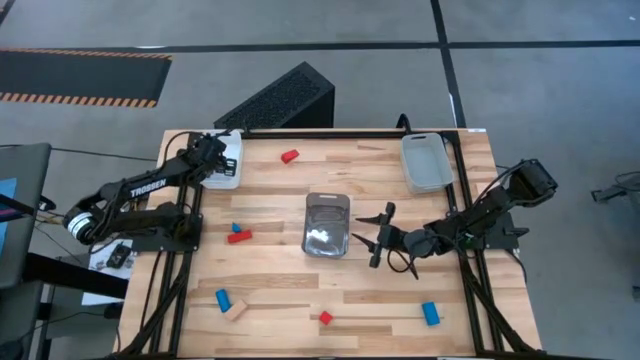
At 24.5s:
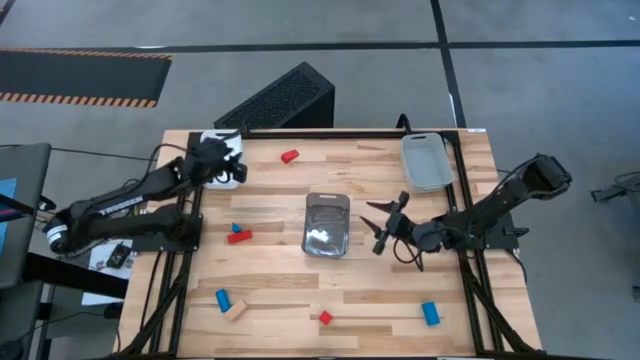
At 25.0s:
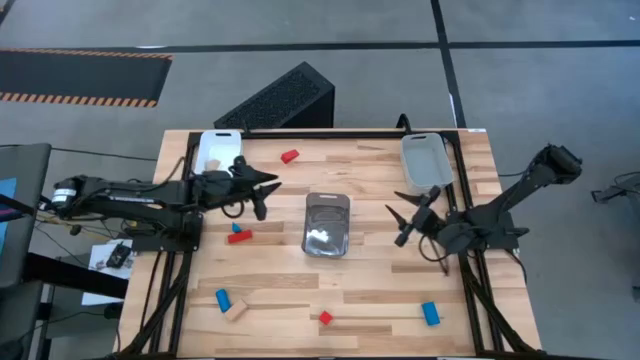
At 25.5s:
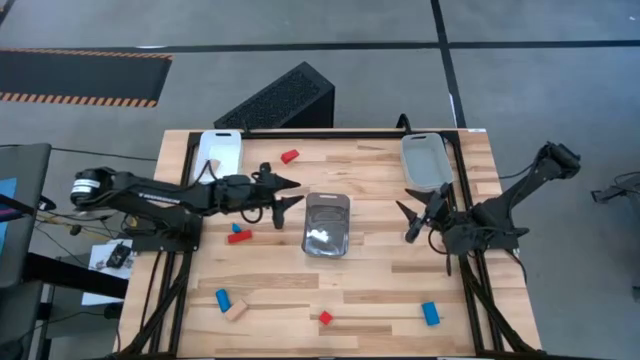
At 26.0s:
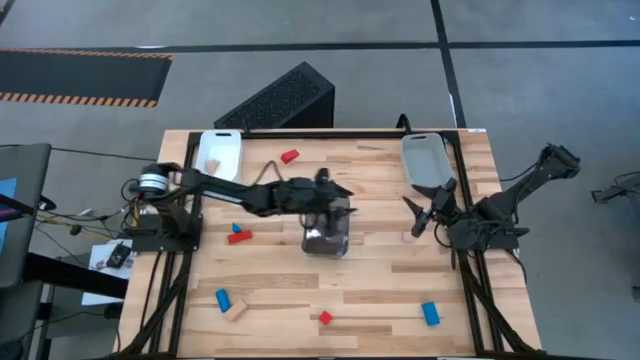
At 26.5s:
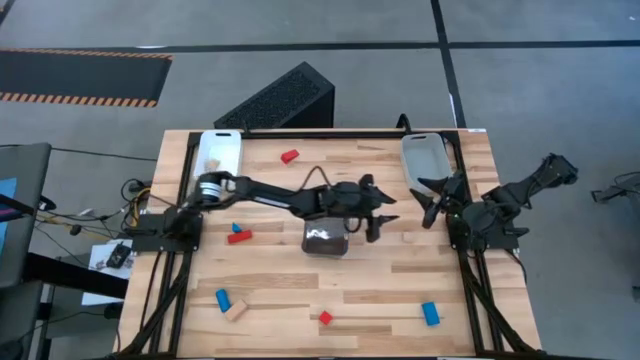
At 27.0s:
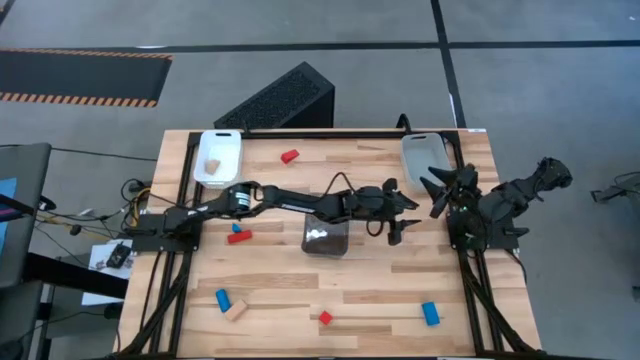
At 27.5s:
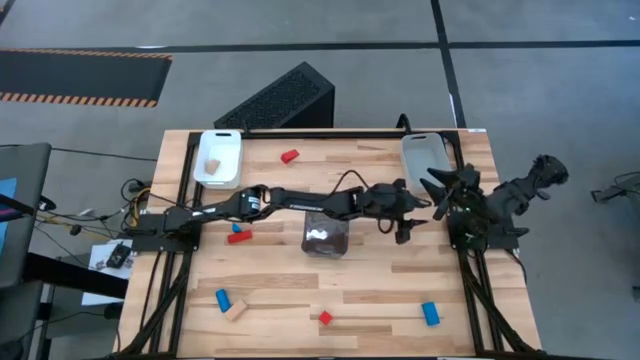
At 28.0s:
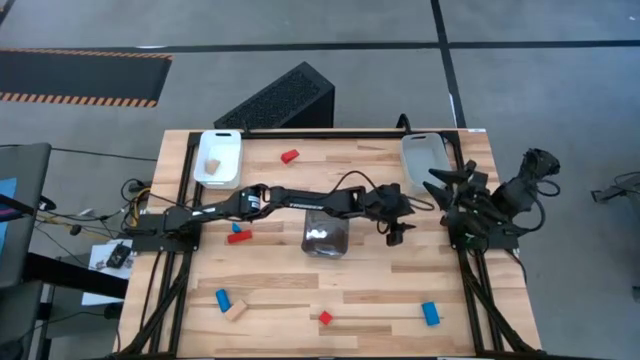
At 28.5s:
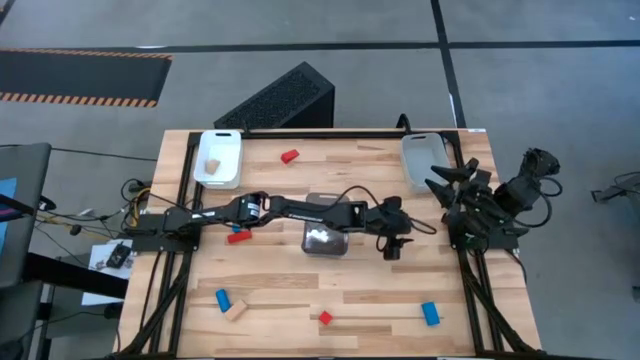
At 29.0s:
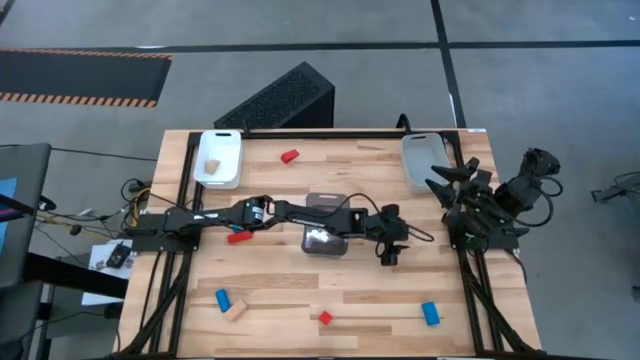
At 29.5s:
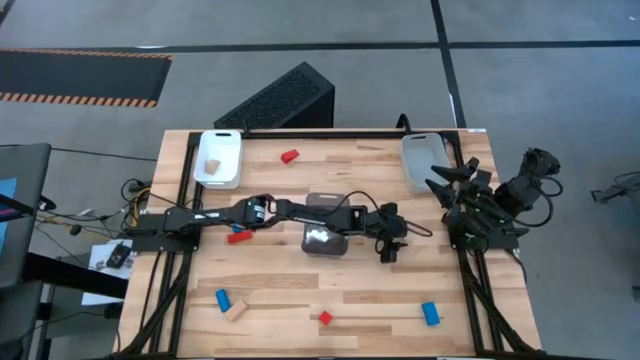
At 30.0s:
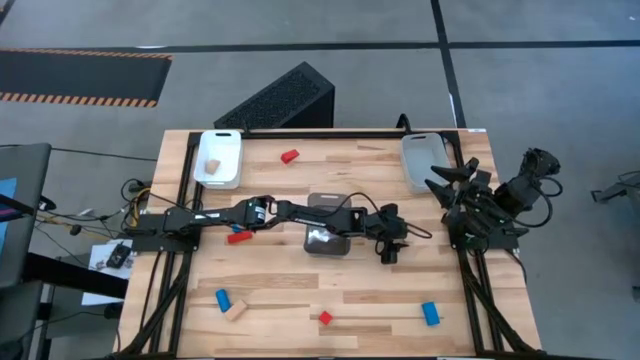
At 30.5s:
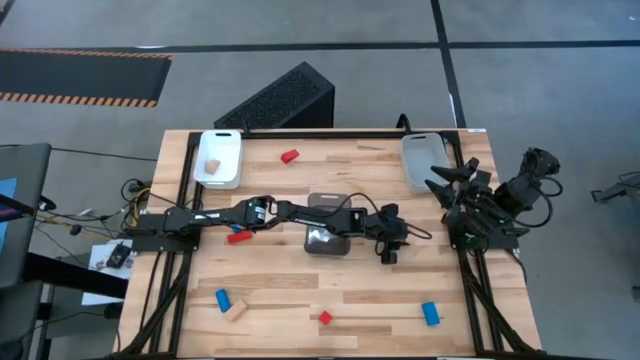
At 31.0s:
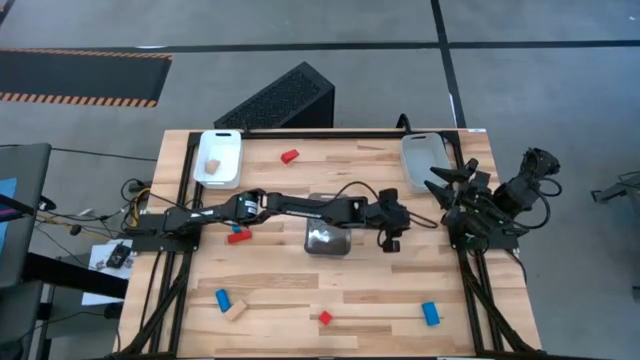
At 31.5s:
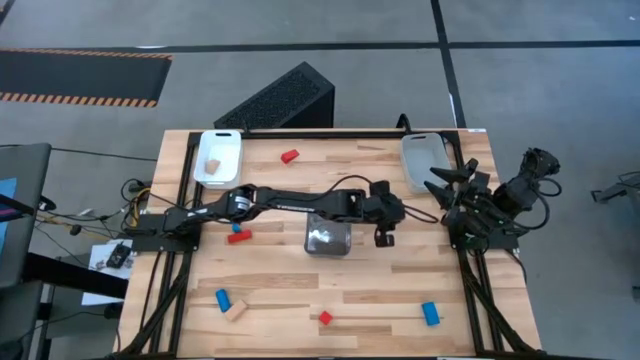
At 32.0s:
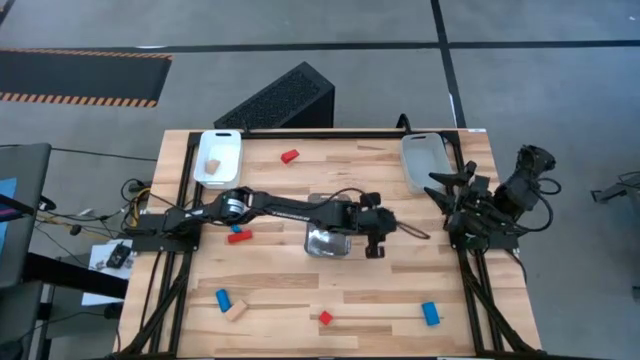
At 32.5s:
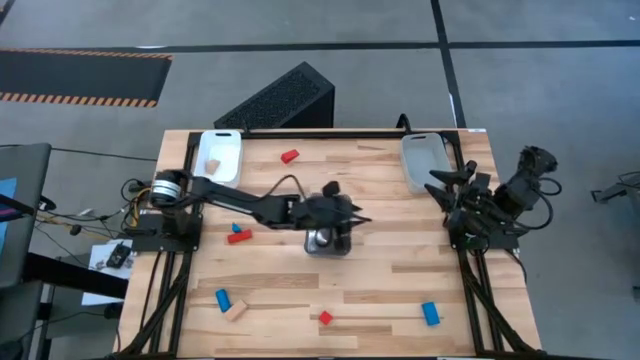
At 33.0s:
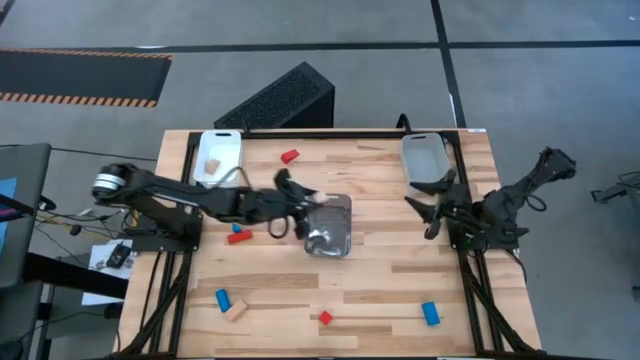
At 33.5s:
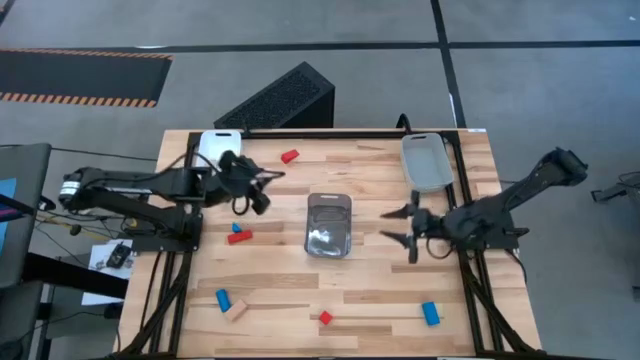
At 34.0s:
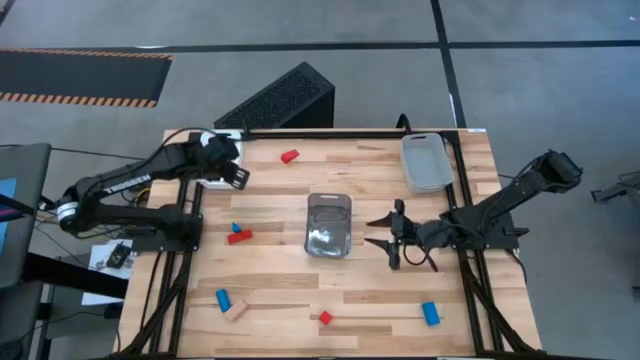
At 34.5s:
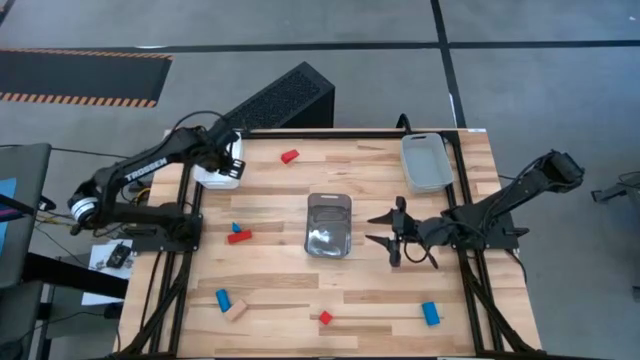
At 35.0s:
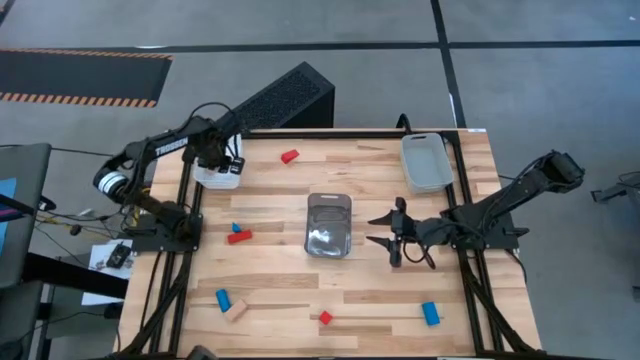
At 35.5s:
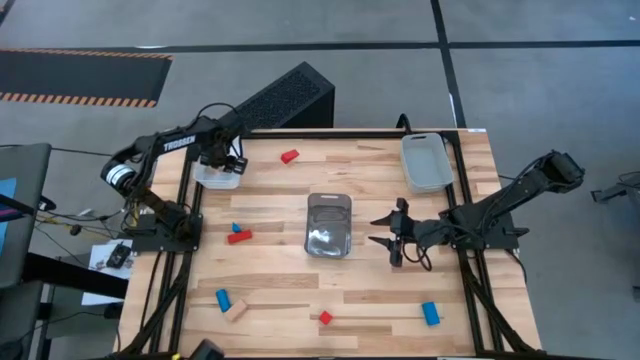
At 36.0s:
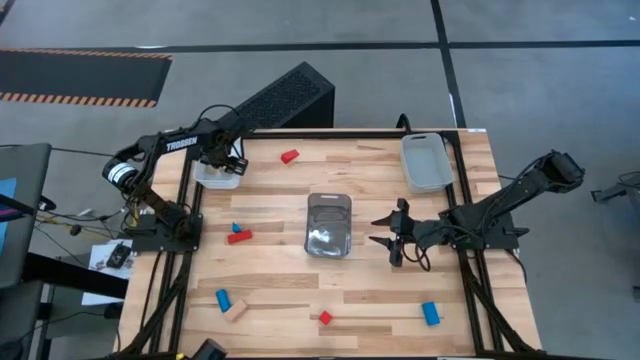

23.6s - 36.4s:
Task: Sort & place blocks by color
Put the right brown block into the white bin

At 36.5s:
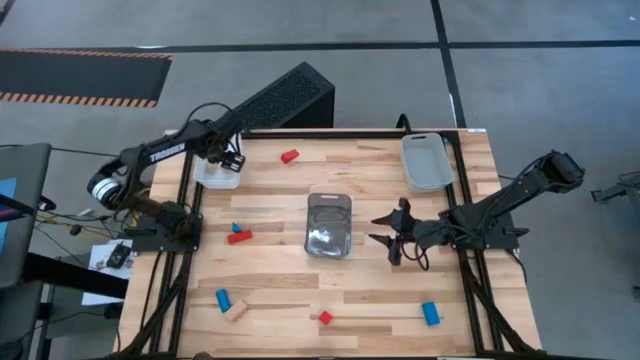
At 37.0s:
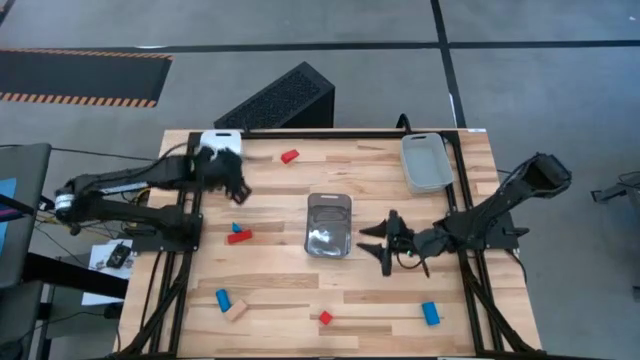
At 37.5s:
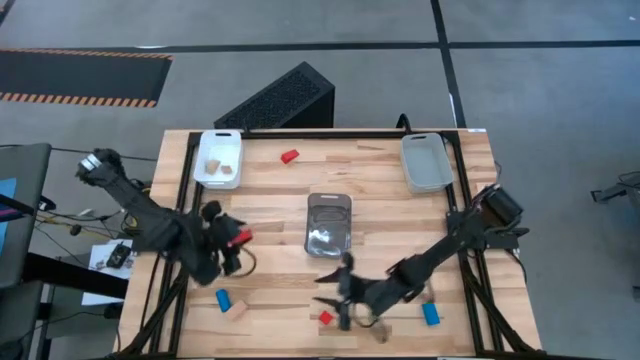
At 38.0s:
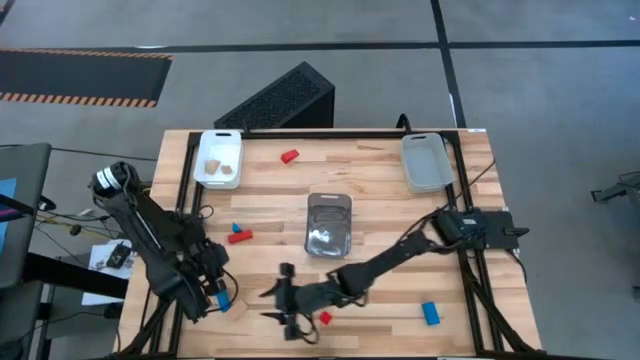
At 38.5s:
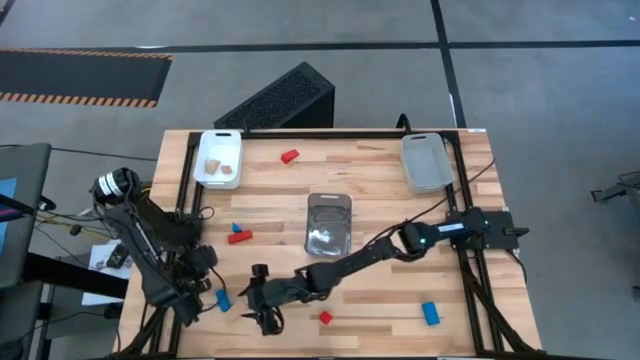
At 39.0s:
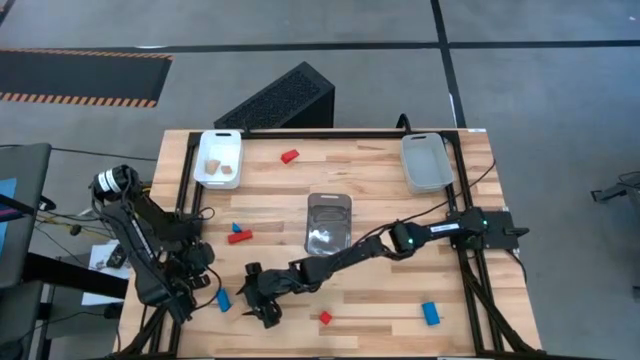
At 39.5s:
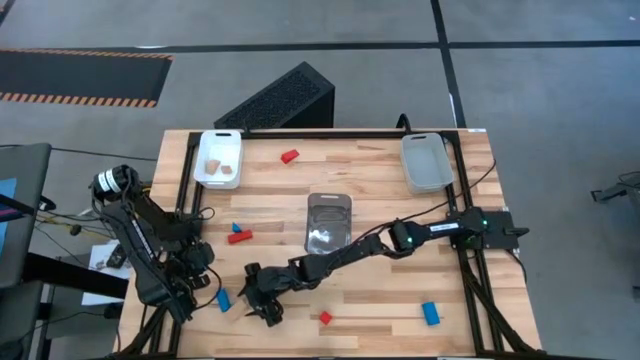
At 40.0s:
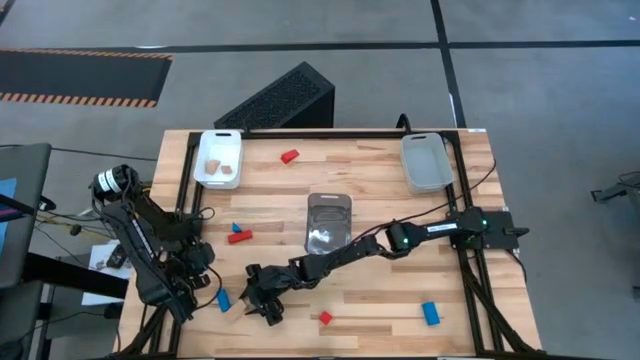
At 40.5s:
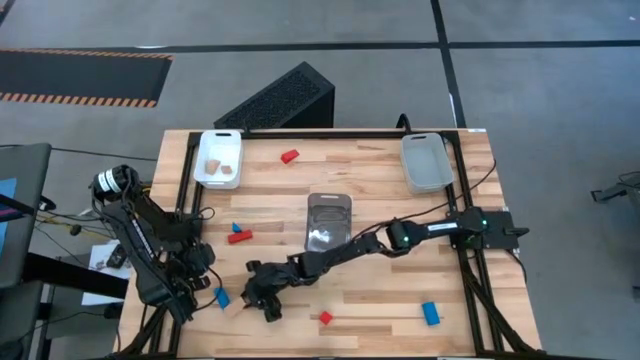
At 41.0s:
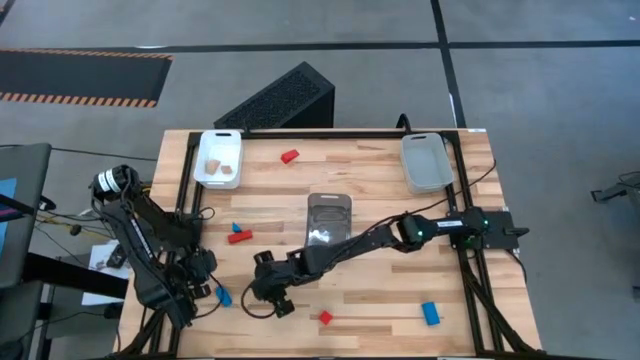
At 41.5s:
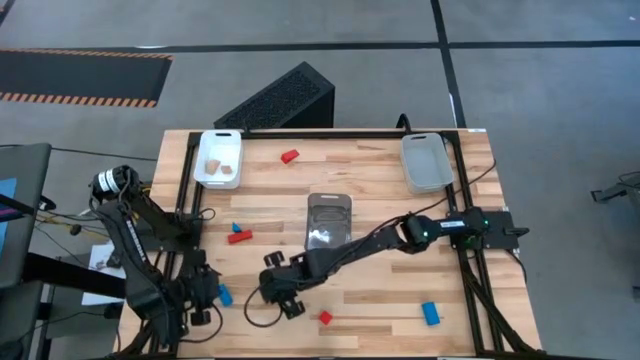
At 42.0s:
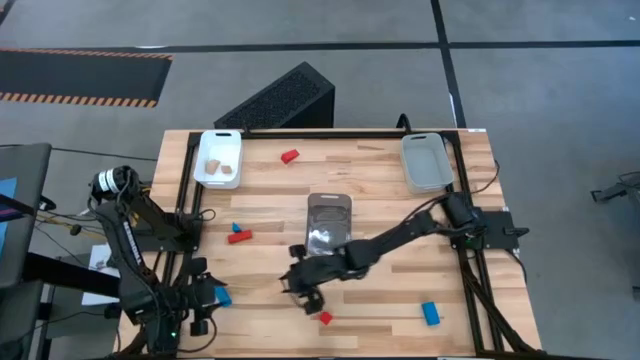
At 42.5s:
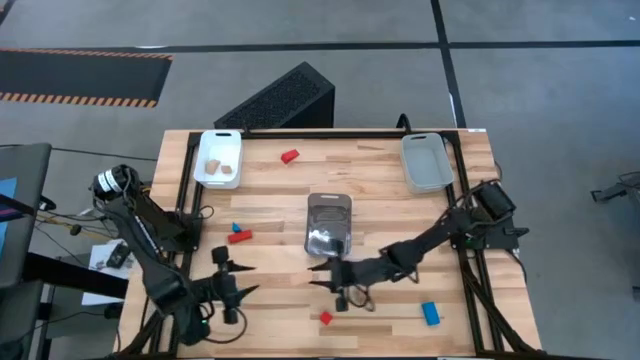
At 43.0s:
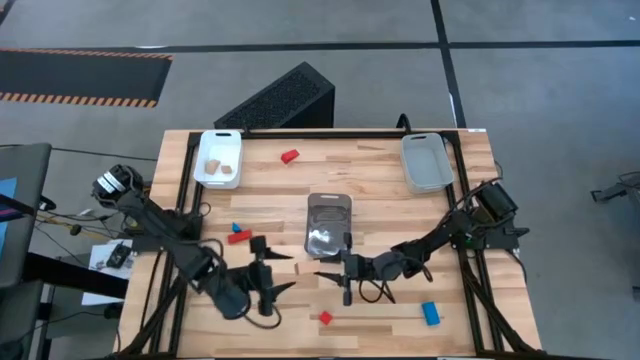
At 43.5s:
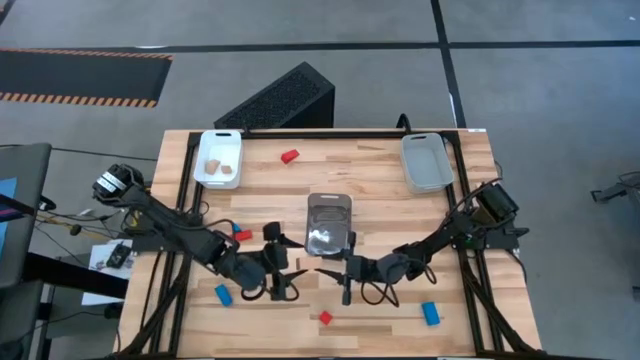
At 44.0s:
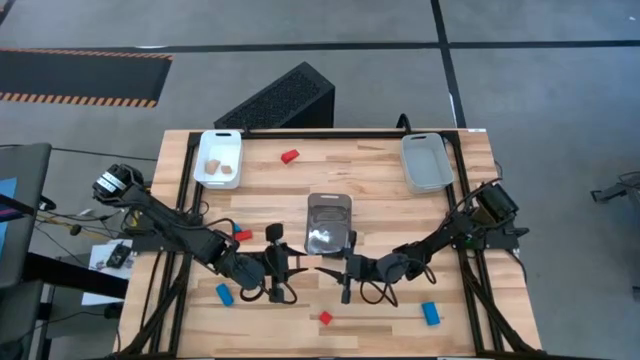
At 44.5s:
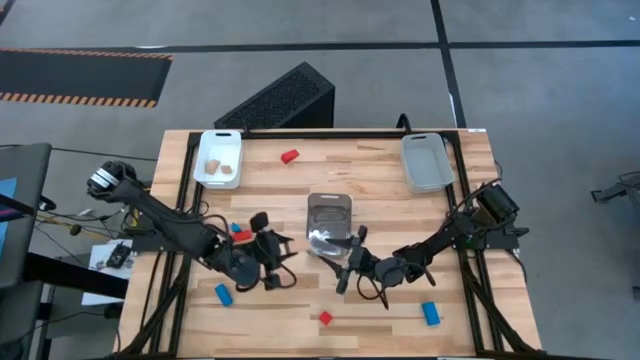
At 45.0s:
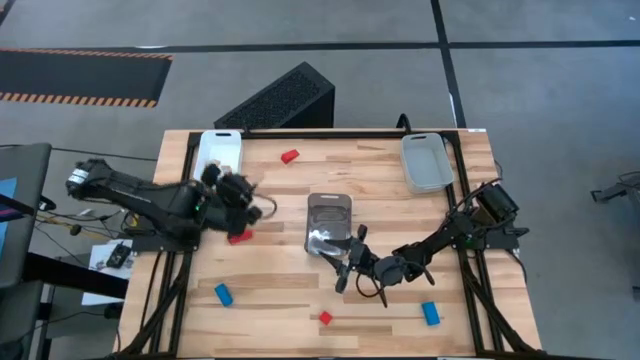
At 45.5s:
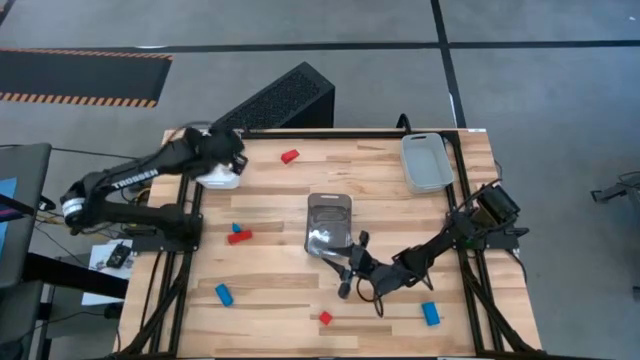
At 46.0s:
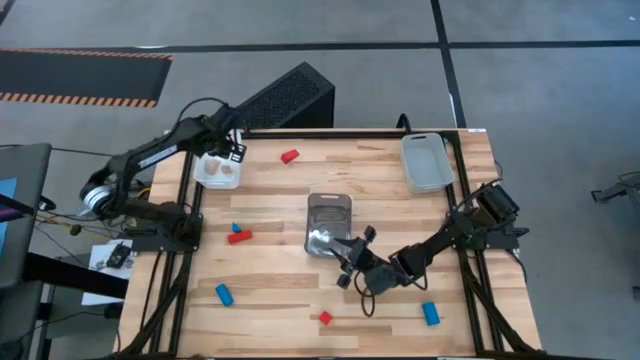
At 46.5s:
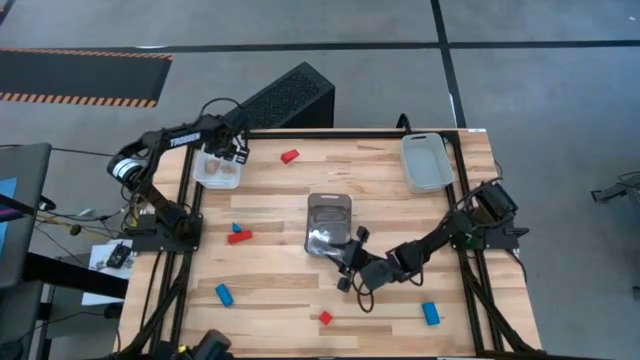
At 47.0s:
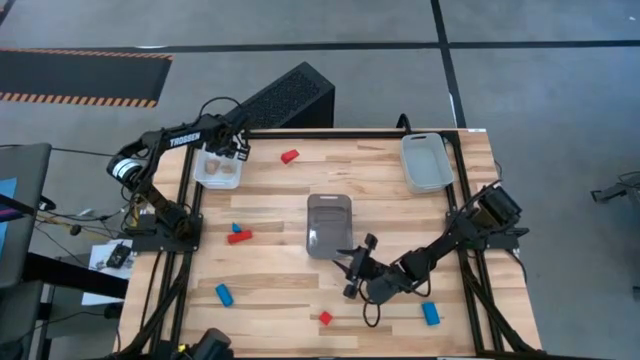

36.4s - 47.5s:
Put the brown block into the white bin
